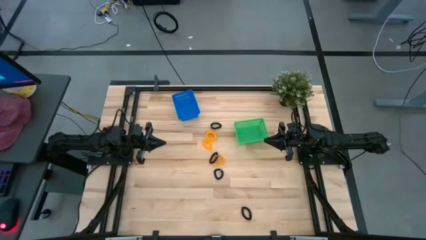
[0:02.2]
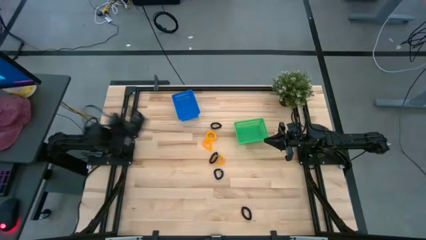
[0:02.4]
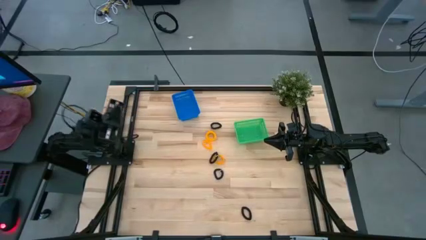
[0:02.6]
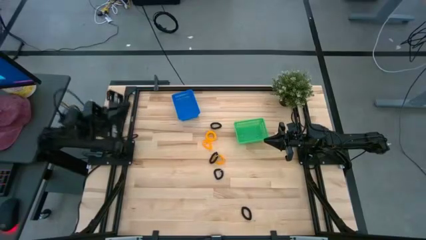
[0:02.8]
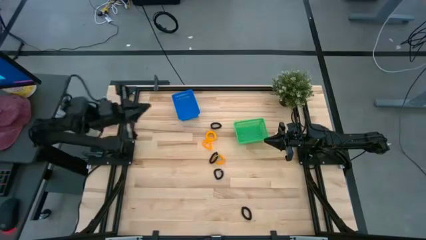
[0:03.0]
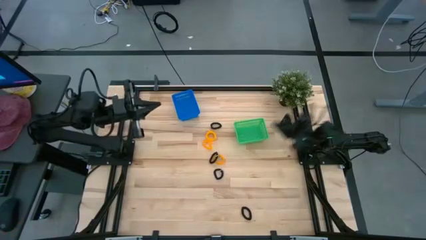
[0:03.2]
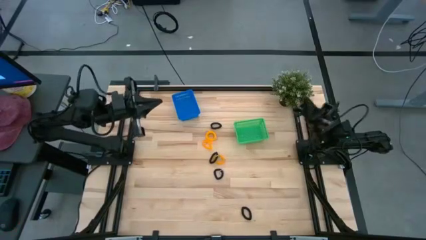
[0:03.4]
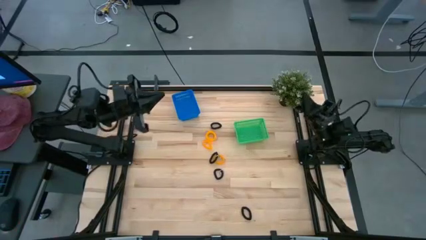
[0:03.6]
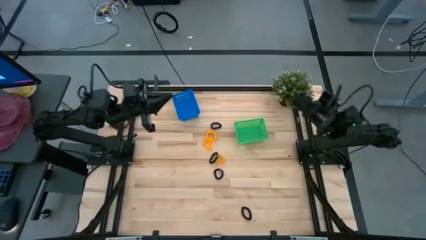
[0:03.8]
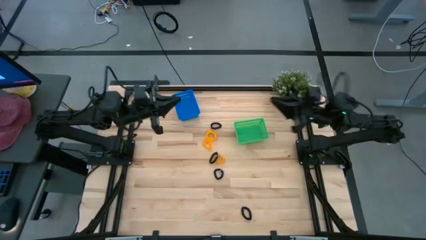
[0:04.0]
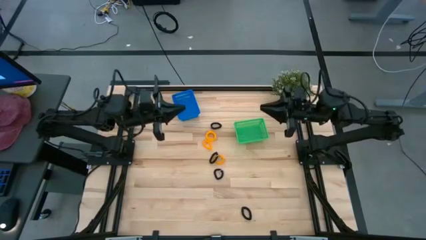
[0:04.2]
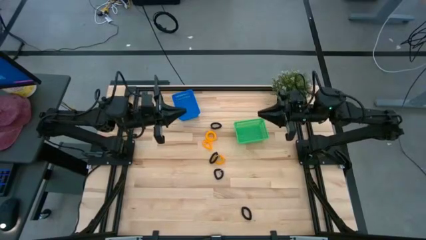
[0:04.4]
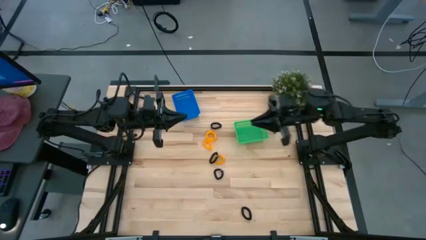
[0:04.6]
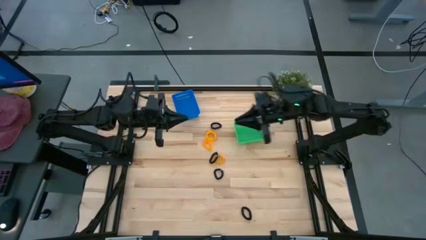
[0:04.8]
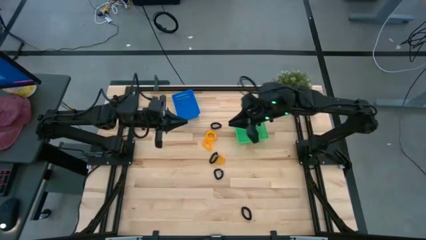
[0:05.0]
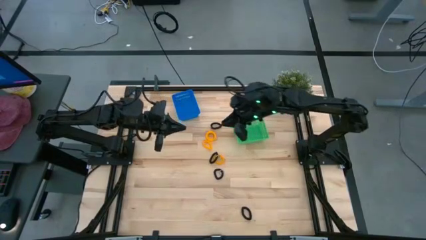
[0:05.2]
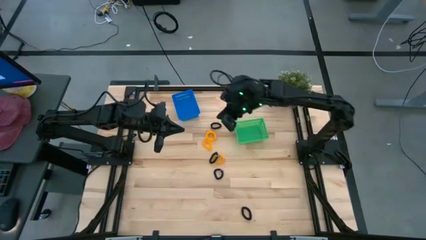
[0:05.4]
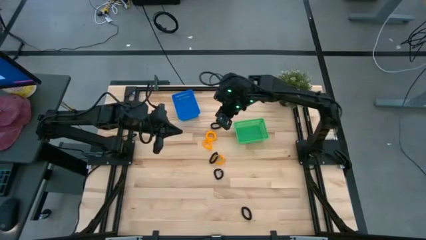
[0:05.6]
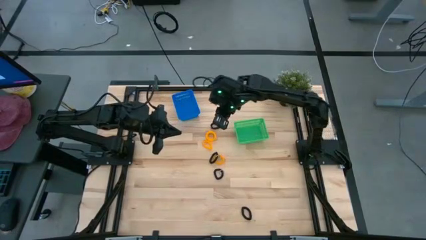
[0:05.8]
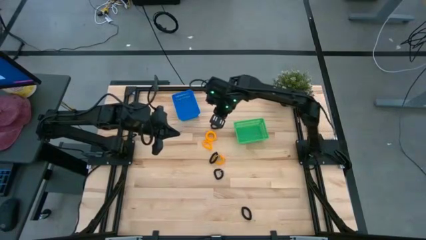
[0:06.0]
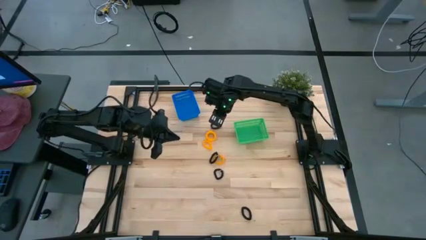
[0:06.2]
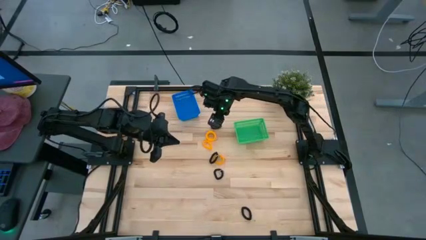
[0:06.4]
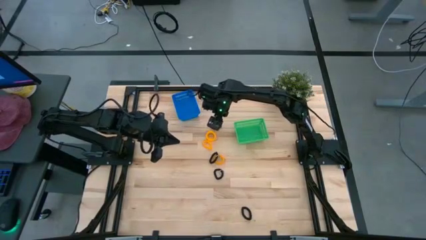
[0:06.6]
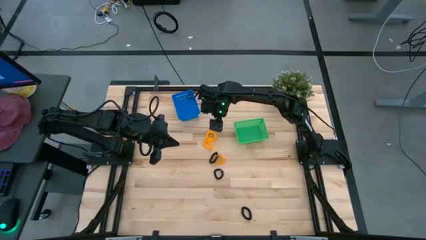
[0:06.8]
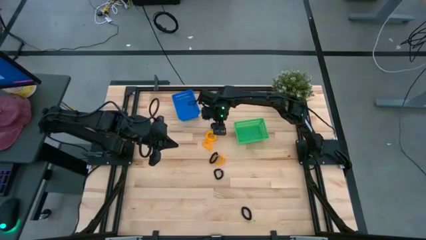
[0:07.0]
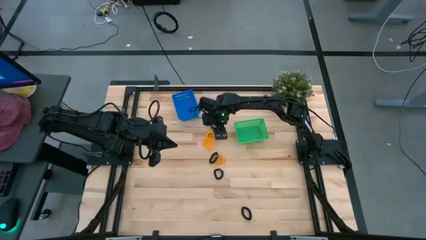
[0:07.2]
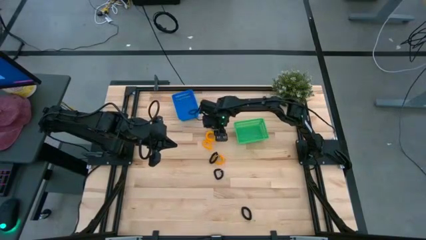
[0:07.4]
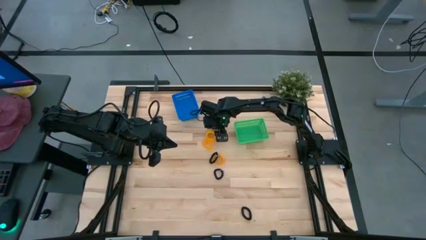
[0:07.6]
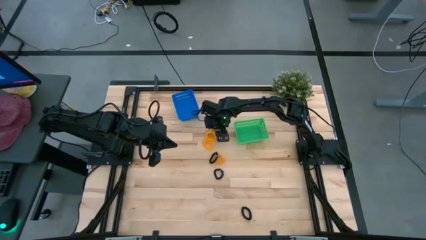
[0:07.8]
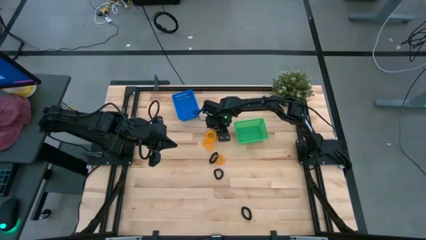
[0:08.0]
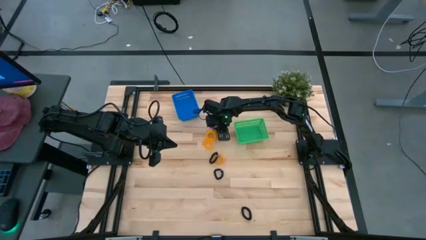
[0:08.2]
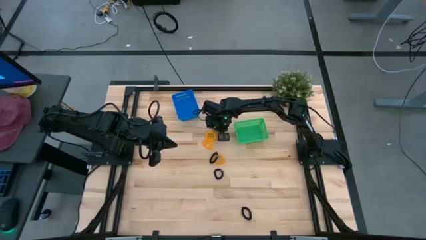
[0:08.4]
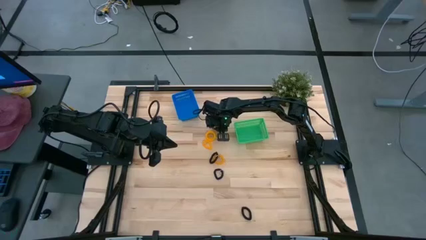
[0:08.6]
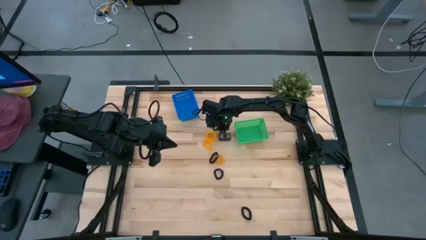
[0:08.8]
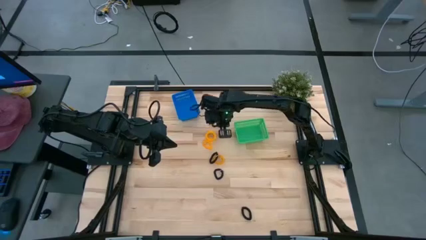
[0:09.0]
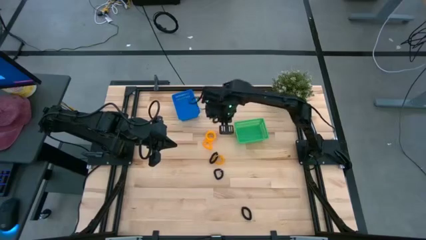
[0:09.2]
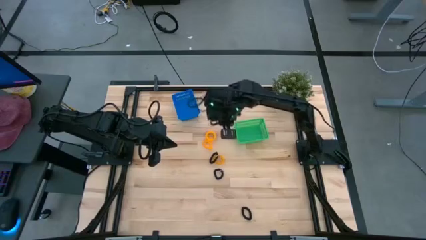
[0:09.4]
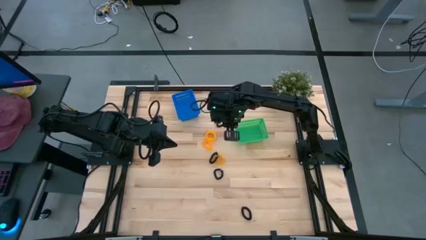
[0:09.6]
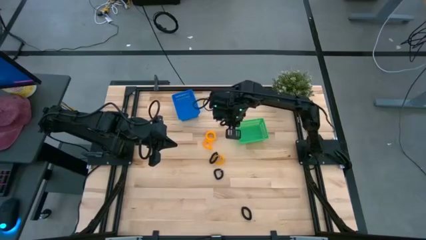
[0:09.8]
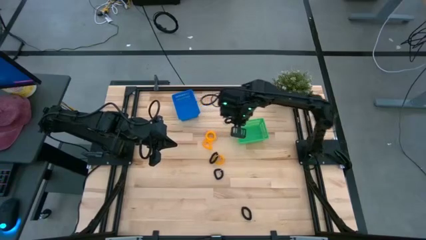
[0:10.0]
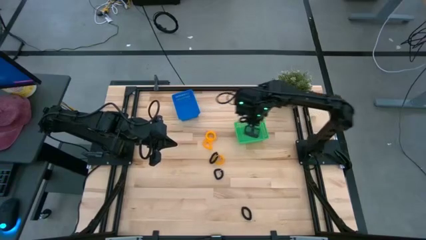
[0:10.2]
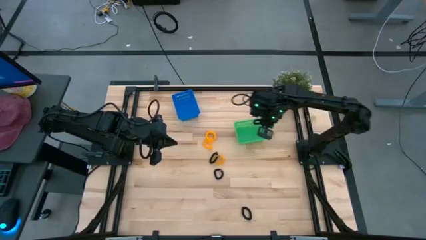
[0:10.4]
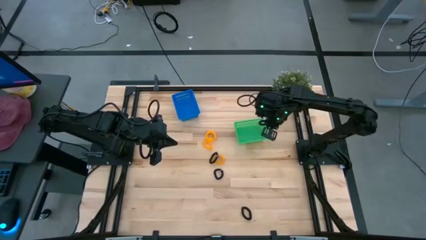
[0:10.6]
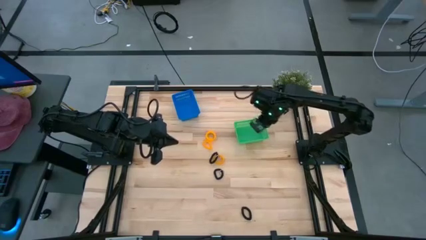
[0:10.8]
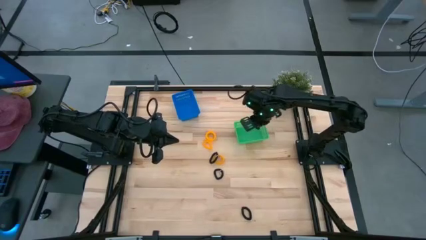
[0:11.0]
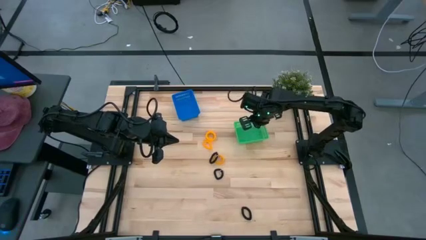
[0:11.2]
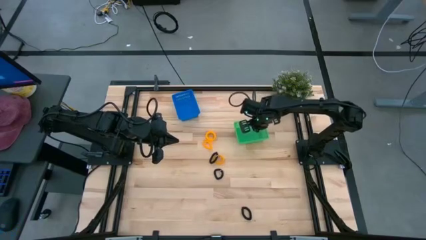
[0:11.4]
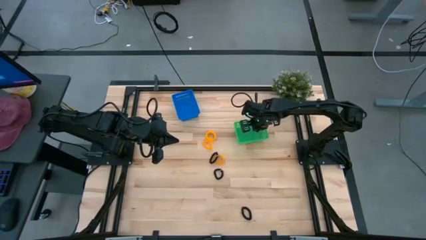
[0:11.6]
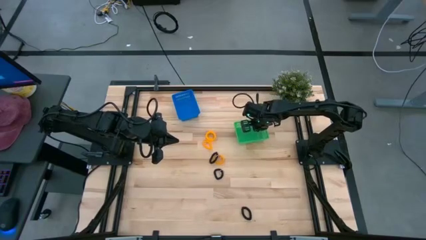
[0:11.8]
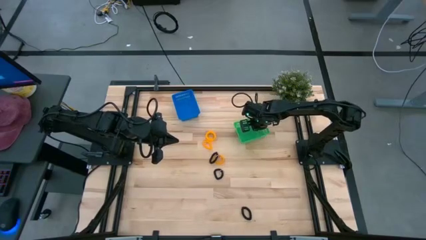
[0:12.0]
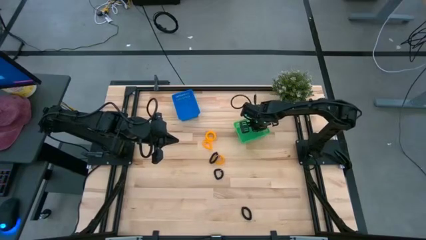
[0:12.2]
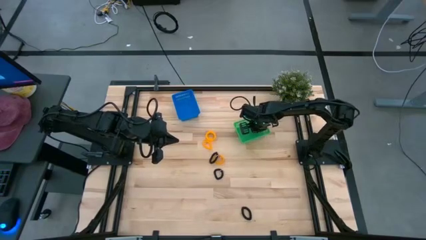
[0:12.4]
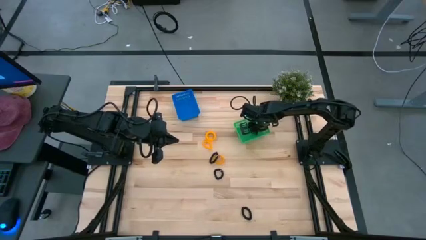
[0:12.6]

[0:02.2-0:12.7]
Task: Sort spring keychains
Put the black spring keychain into the green bin

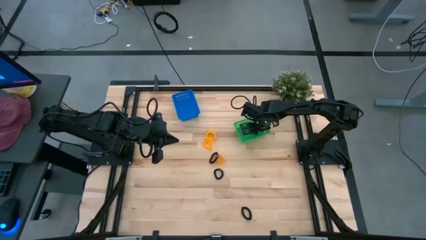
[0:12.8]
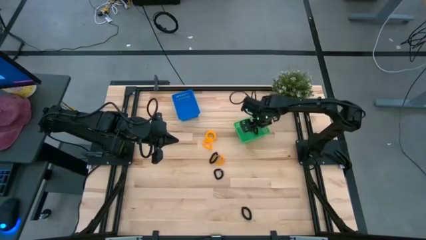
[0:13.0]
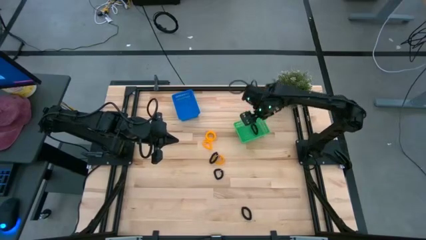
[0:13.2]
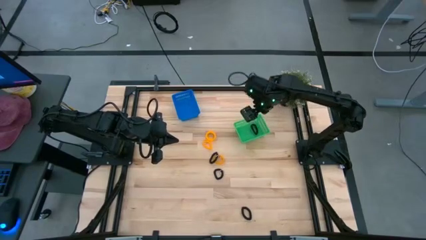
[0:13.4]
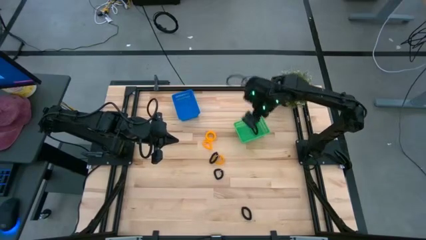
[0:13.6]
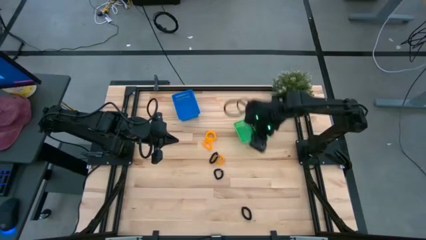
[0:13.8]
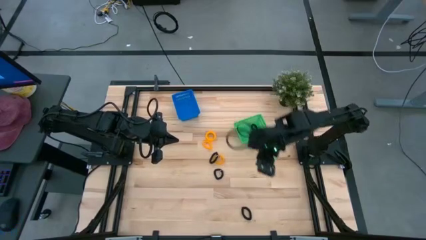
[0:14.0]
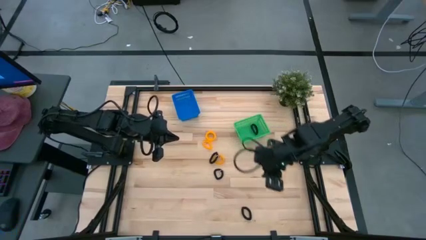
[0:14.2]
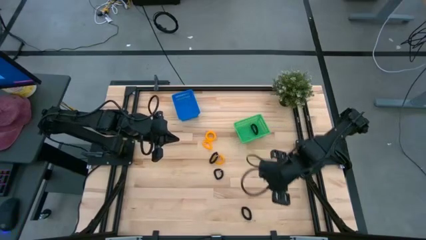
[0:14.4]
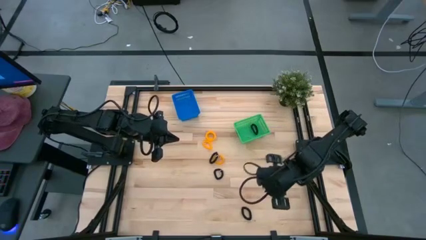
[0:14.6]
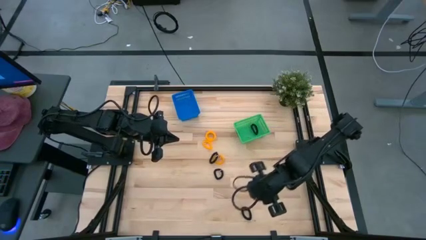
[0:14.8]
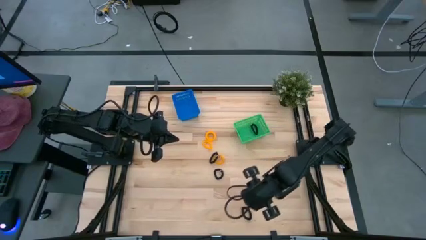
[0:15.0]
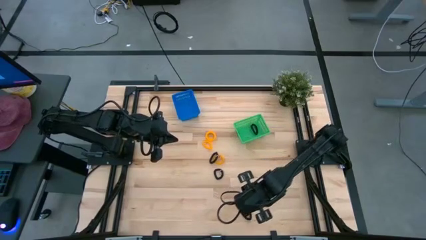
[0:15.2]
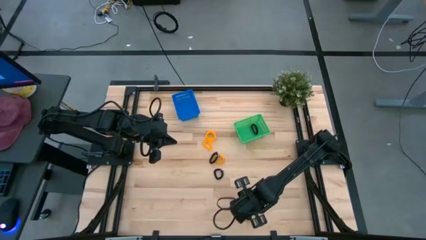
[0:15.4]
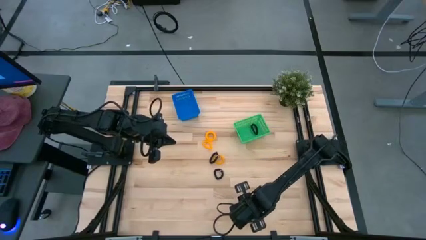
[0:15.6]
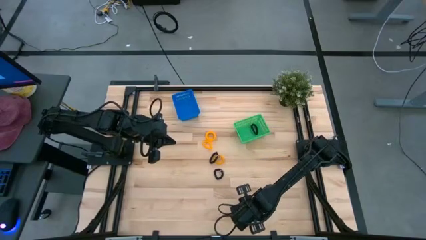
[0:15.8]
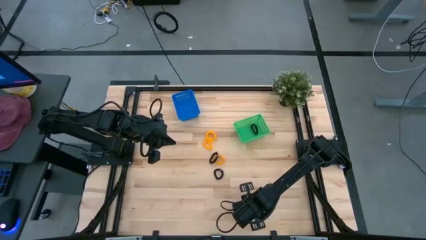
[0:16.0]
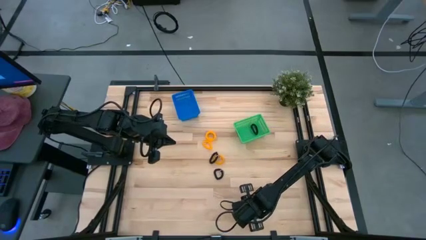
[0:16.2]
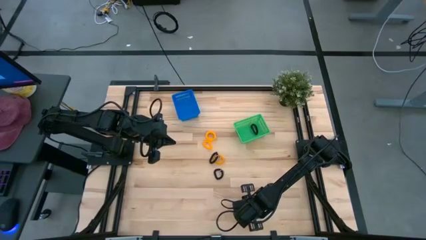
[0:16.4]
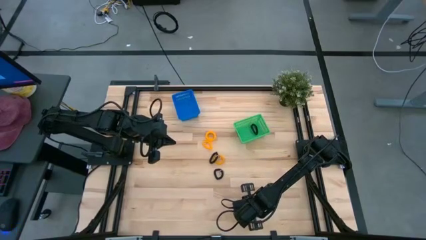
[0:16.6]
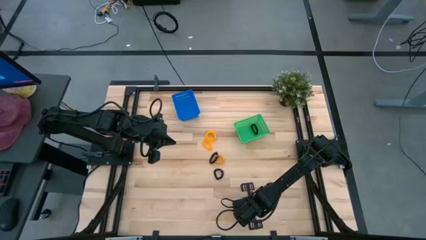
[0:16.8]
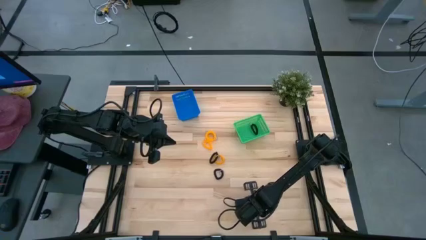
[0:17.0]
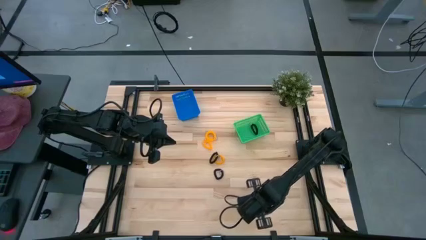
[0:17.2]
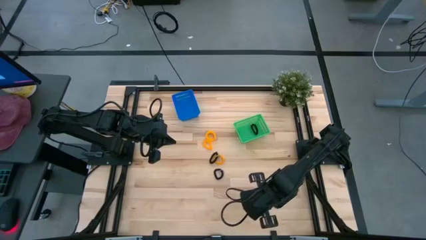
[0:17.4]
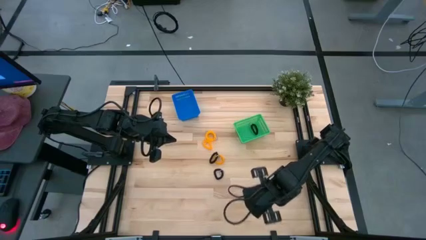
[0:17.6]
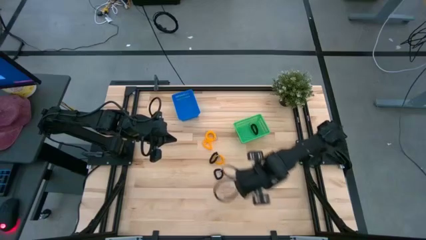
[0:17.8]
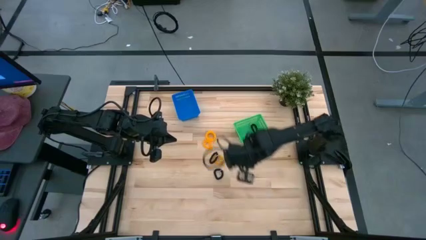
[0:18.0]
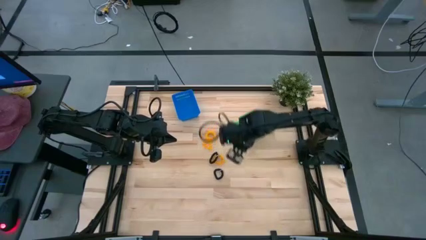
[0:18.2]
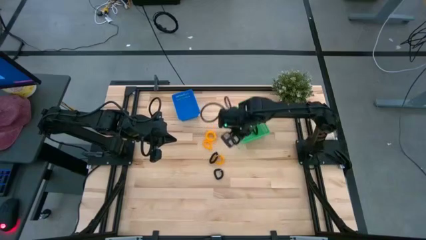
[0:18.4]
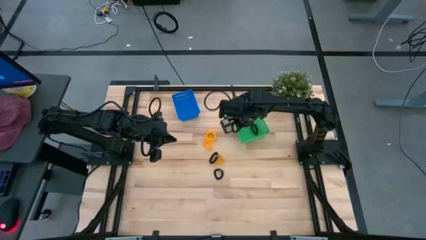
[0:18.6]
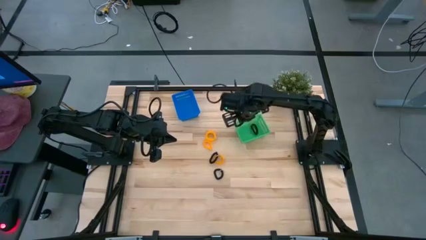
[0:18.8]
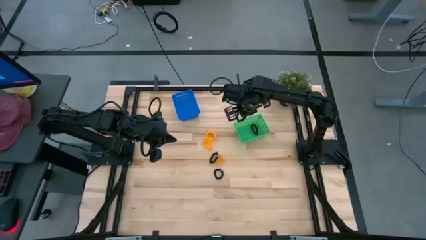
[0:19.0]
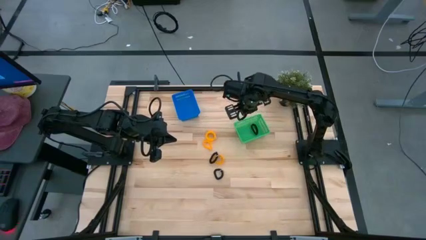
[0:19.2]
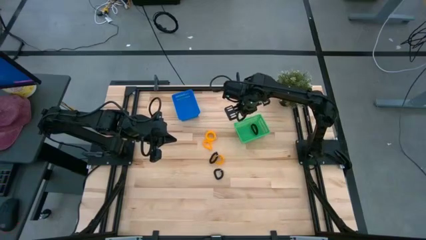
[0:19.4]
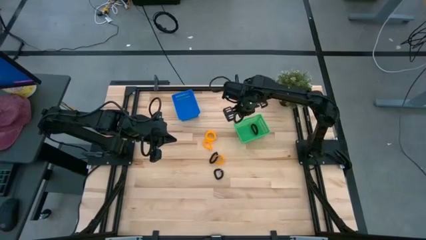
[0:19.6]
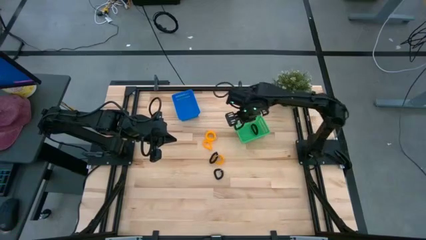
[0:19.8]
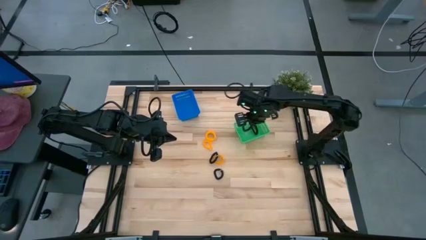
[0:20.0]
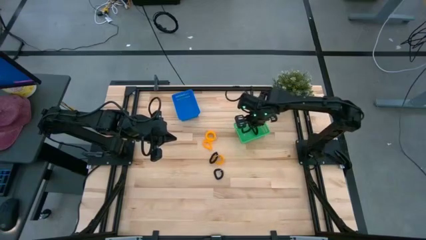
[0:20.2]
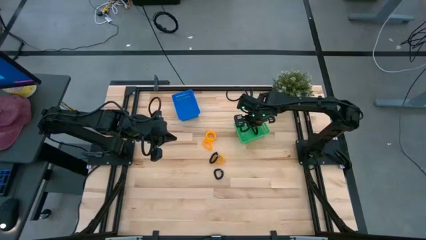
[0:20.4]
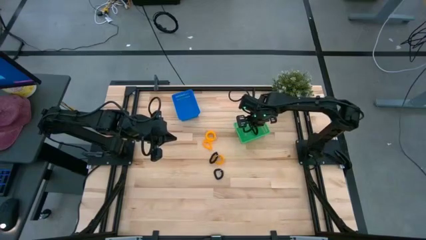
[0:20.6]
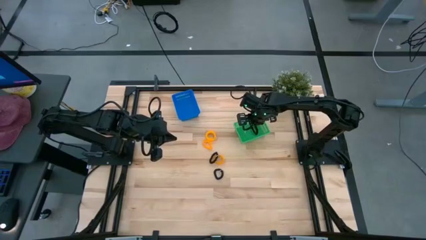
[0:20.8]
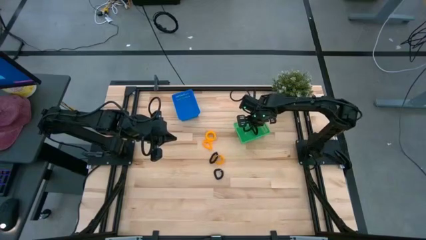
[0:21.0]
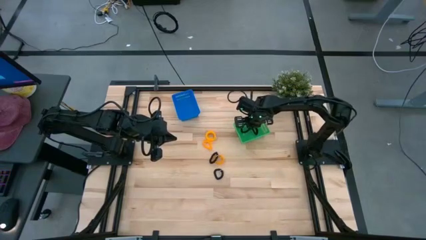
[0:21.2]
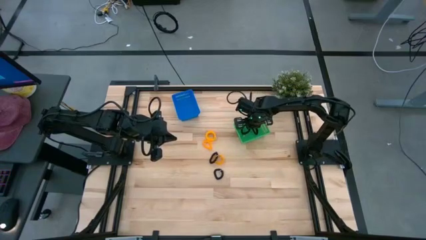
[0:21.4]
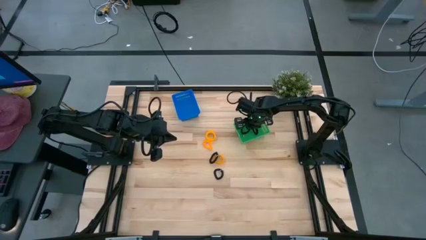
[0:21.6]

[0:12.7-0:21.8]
Put the black spring keychain into the green bin
